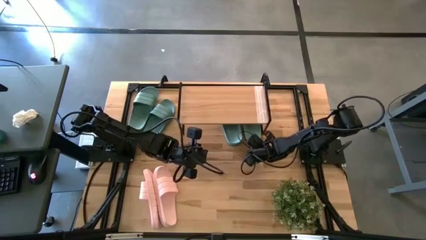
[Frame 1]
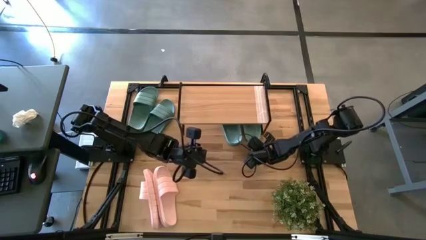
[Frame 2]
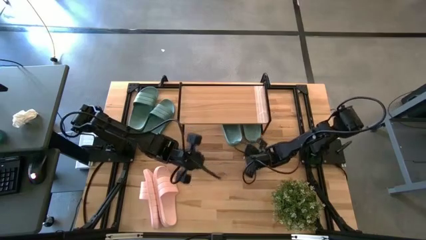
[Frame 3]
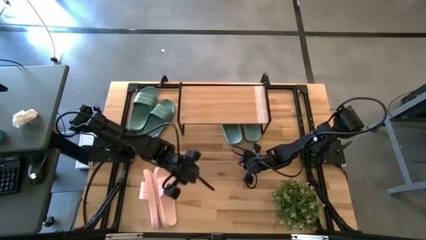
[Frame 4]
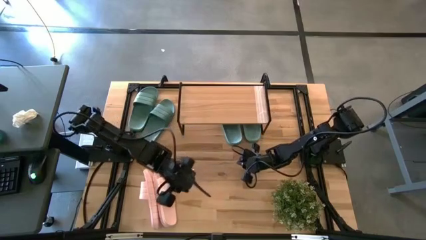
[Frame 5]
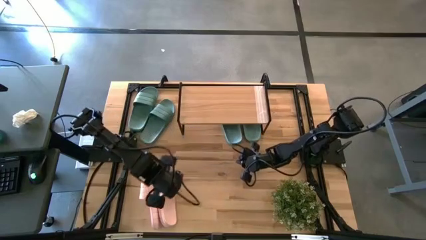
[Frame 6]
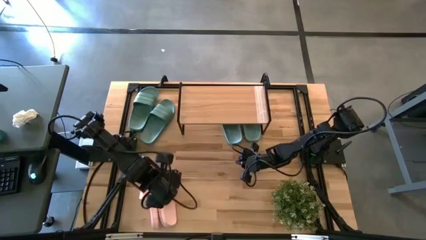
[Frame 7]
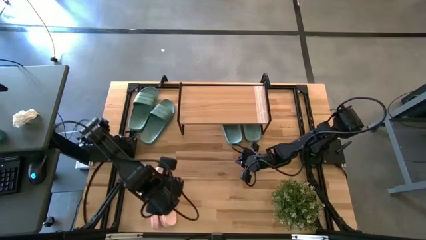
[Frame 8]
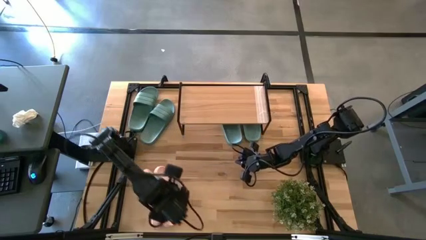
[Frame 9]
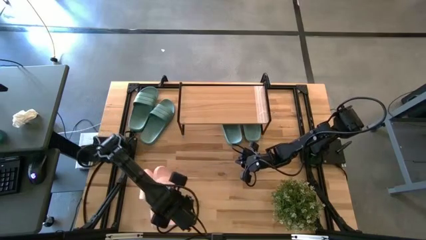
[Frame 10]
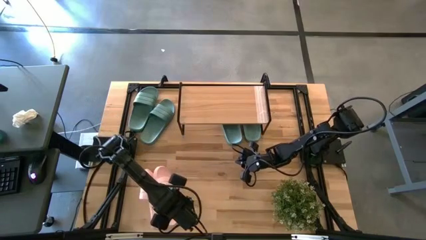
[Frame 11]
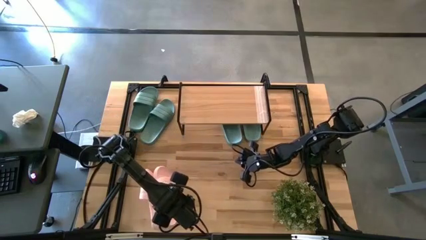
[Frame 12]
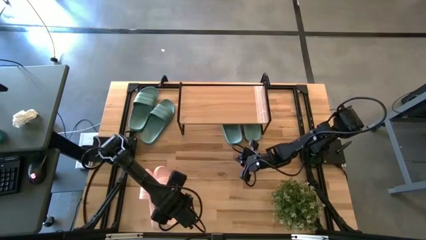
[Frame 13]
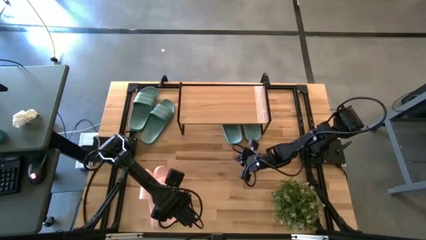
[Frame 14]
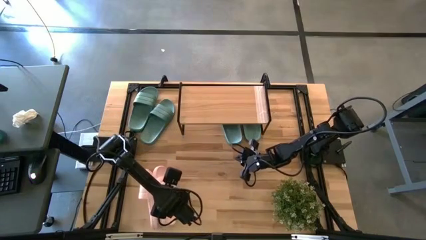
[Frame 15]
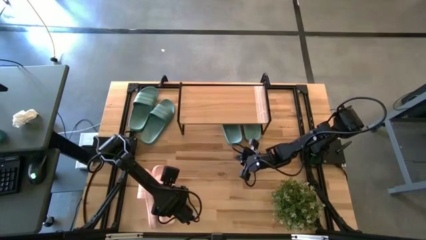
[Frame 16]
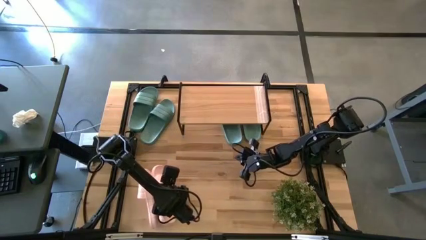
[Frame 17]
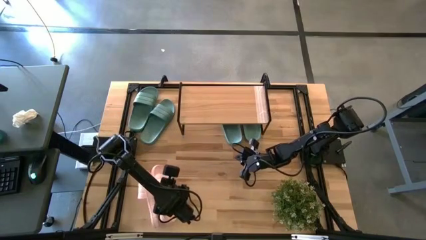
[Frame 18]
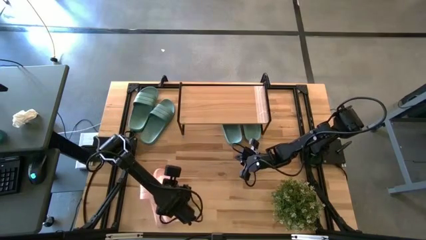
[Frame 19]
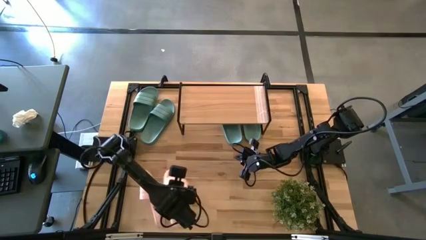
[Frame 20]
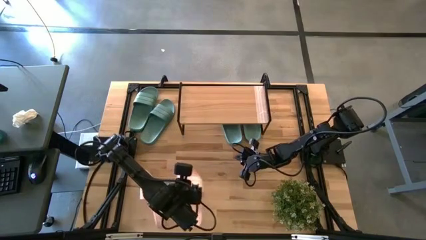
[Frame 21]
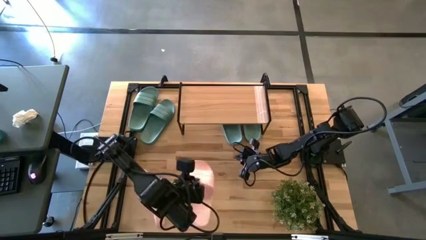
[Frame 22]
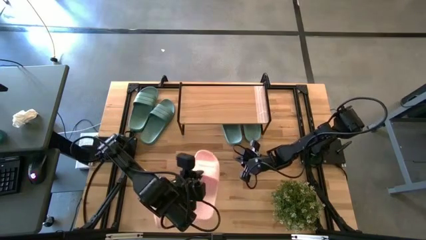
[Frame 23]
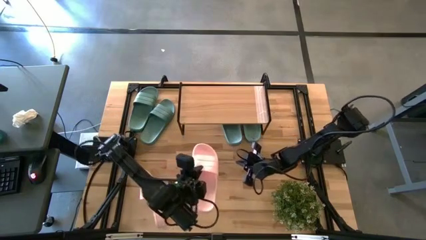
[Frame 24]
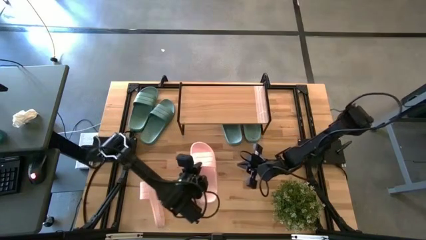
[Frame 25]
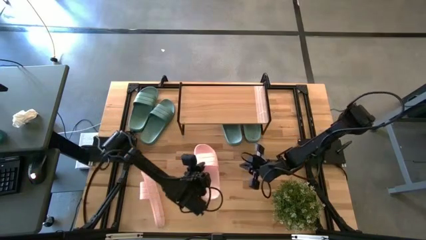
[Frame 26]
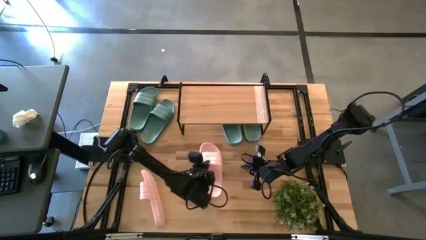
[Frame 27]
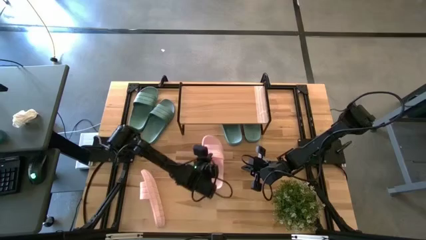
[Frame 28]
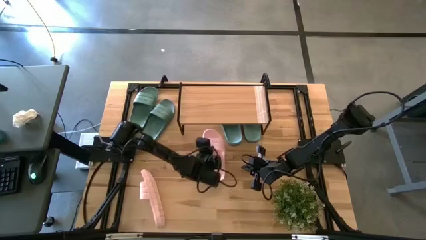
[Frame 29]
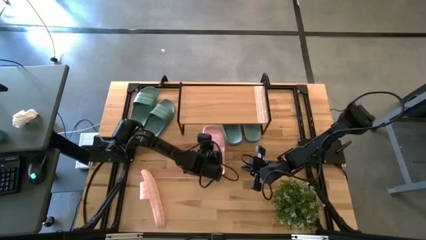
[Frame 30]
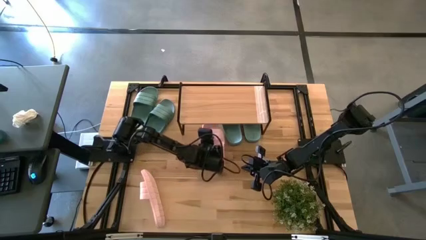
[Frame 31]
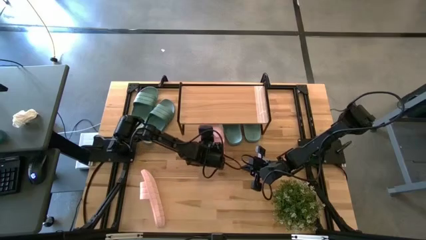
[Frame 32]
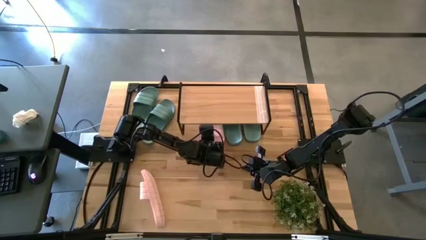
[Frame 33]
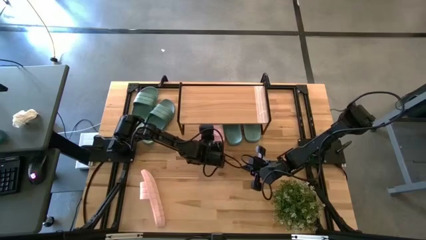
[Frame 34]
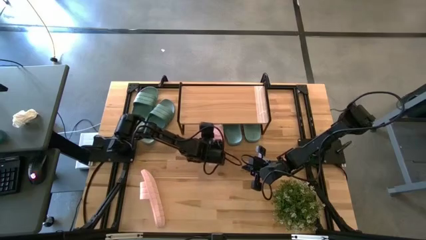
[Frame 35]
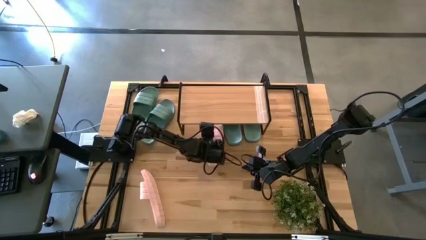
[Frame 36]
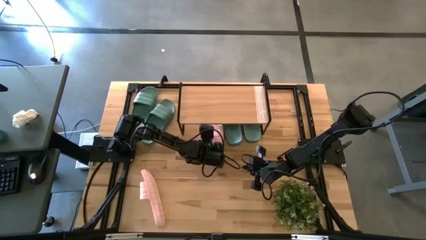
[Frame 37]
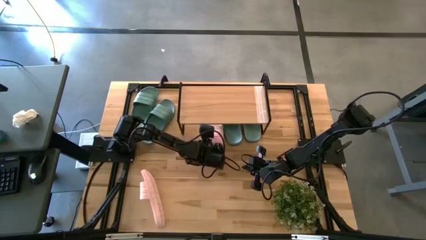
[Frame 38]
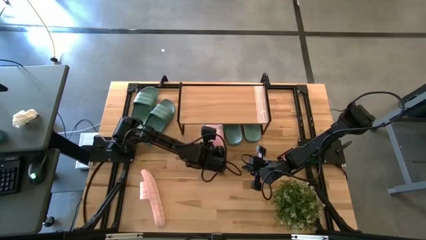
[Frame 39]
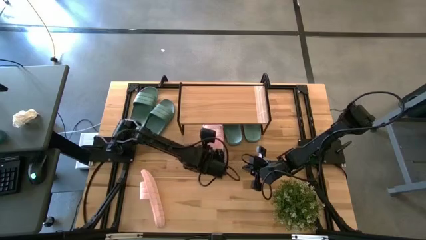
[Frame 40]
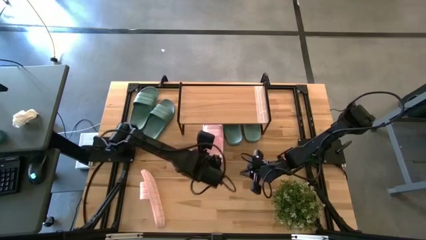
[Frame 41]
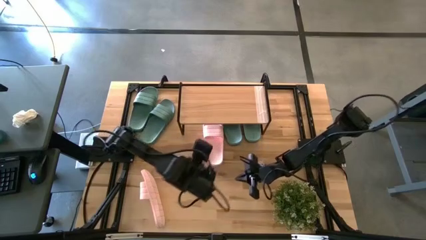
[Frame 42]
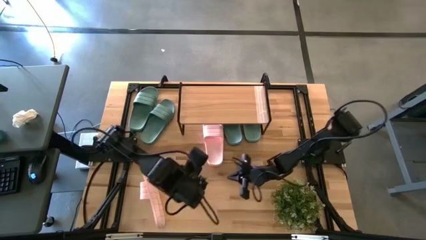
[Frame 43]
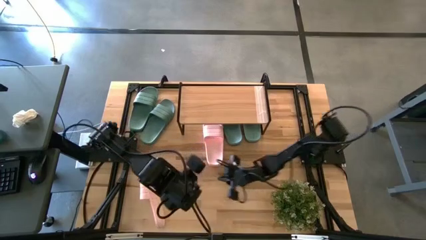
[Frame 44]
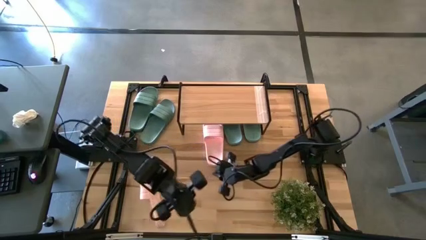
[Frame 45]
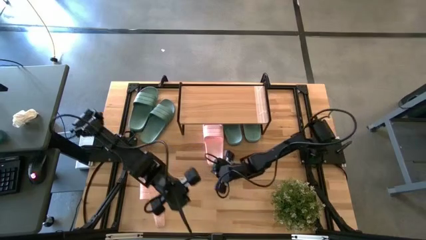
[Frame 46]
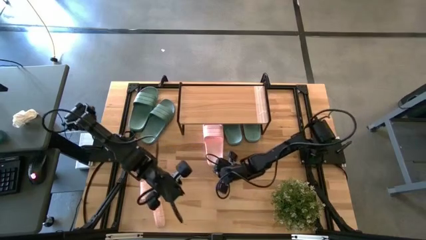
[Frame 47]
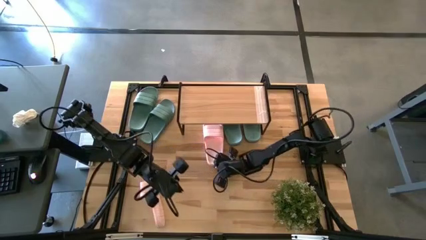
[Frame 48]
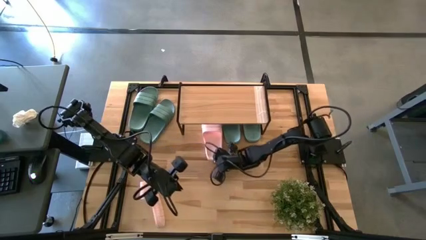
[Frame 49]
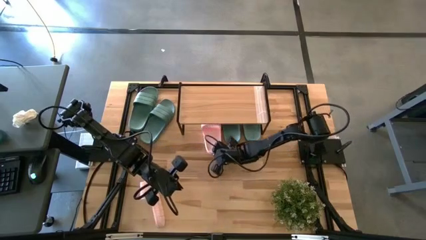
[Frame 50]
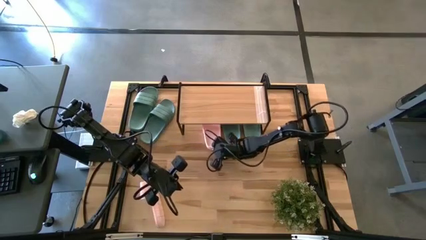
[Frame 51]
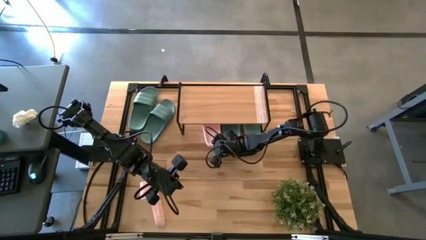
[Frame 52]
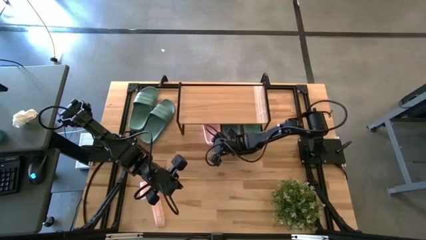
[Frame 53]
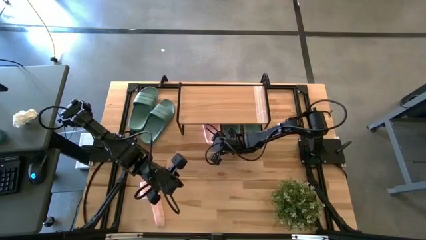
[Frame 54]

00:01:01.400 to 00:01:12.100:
Task: Pick and place slides into the shelf
Put the pink slide under the shelf

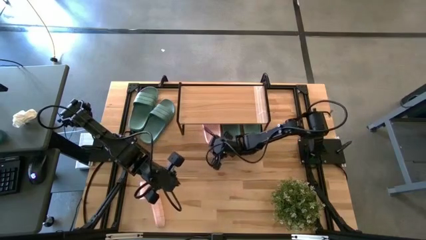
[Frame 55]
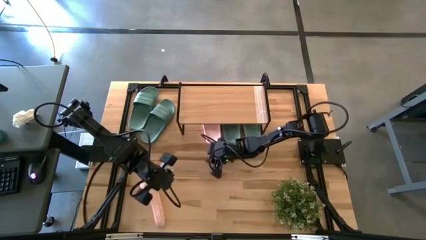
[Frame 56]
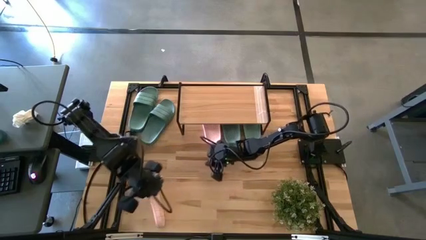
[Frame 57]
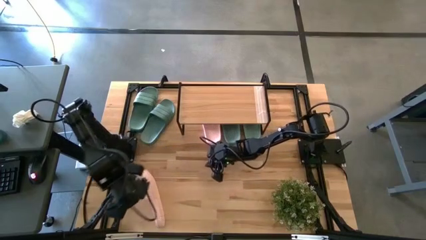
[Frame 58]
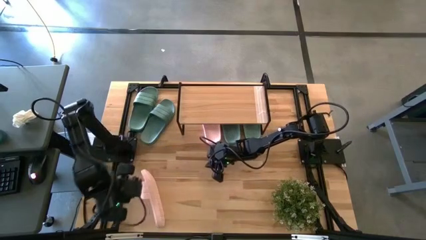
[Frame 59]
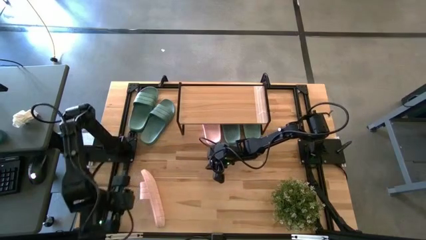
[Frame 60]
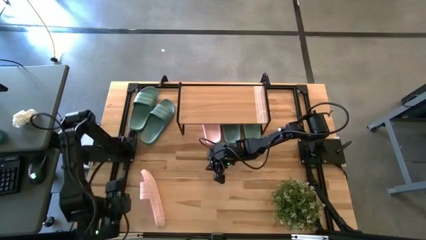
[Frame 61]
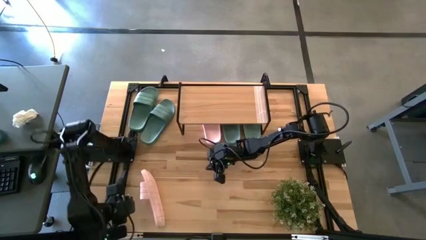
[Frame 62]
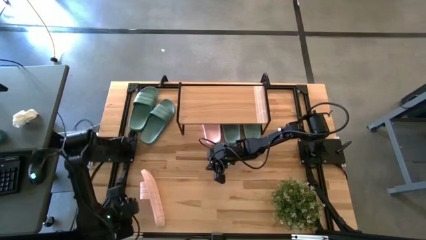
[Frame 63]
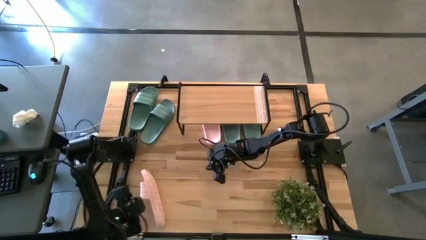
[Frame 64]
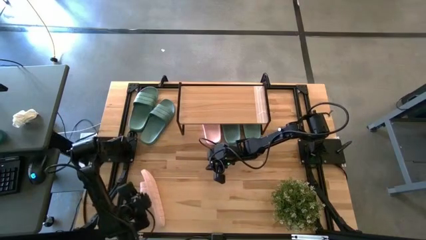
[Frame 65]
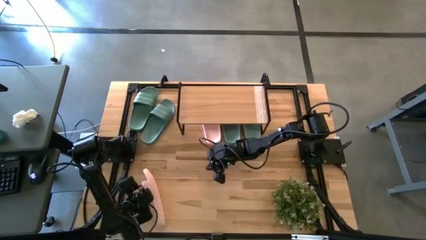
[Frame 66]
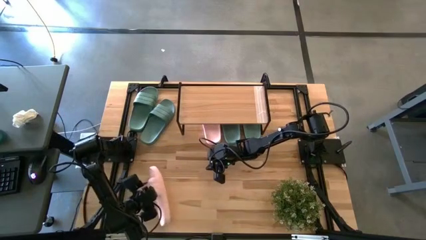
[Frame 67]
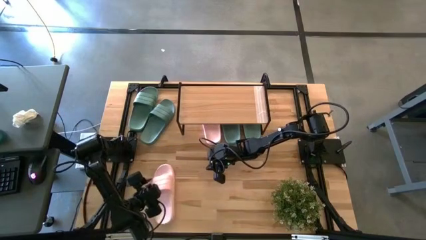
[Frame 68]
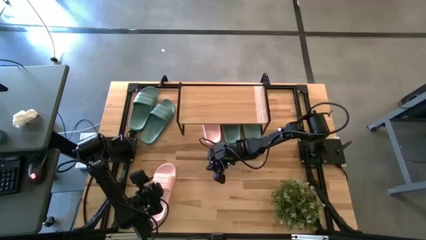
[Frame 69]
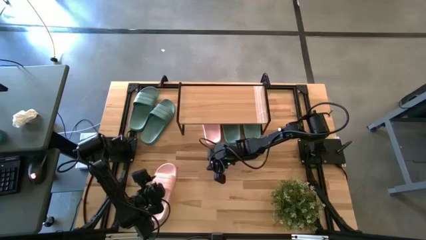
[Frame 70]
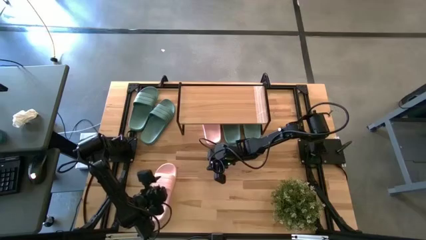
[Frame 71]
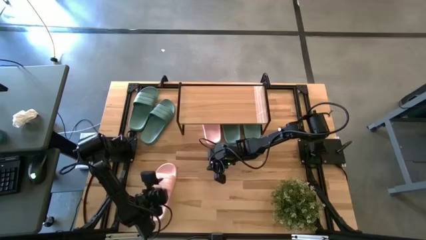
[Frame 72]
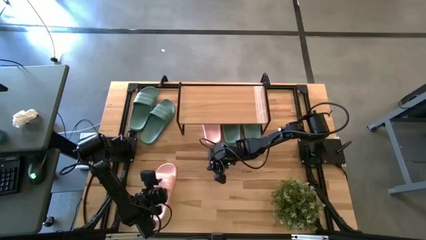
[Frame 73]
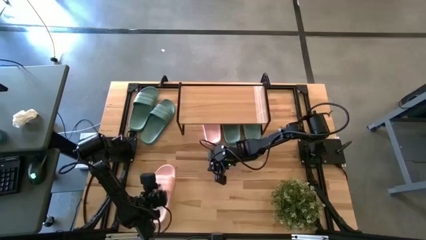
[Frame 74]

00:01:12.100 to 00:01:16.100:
Put the pink slide under the shelf
